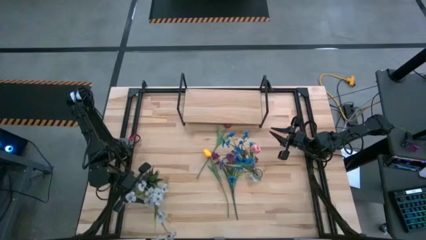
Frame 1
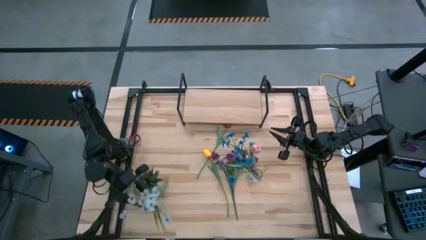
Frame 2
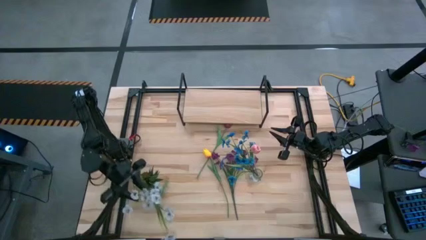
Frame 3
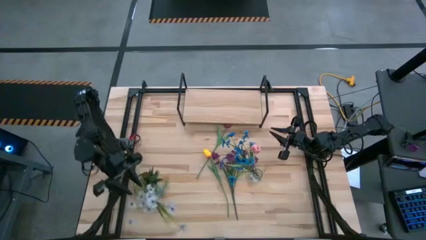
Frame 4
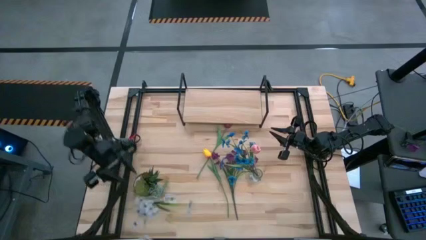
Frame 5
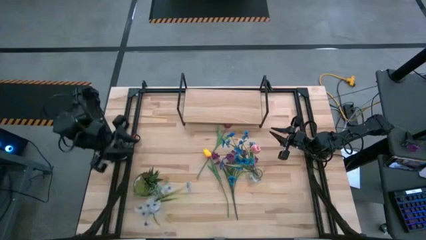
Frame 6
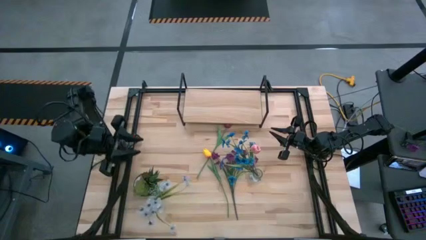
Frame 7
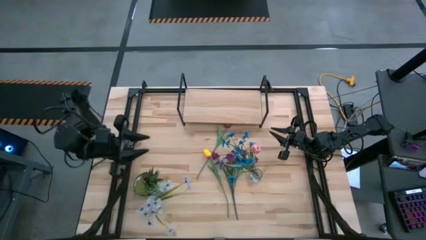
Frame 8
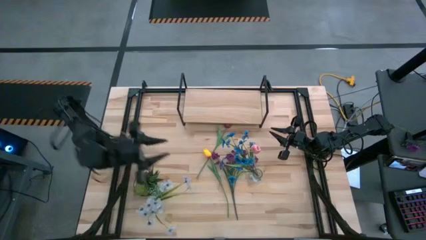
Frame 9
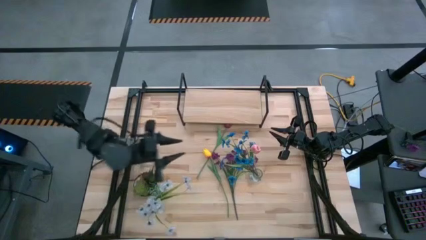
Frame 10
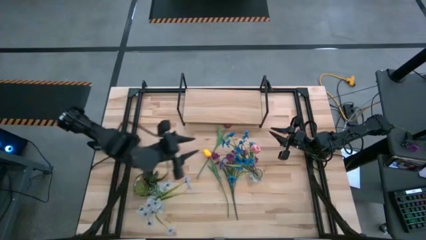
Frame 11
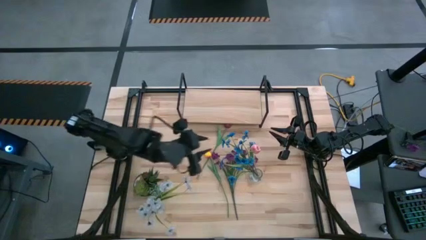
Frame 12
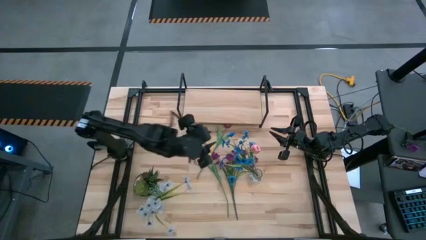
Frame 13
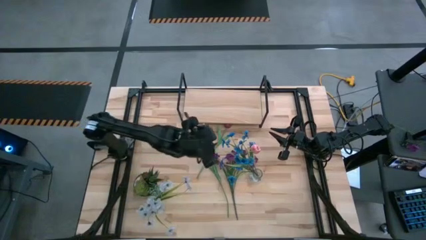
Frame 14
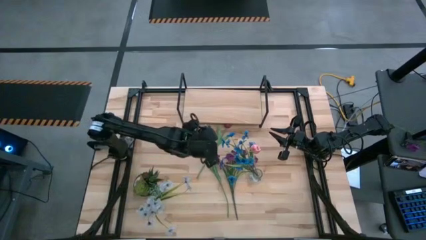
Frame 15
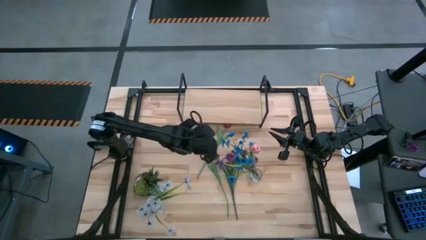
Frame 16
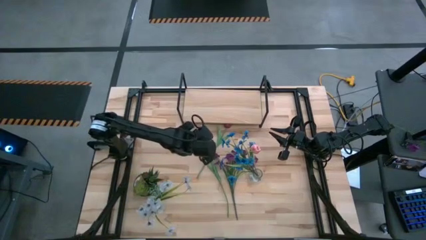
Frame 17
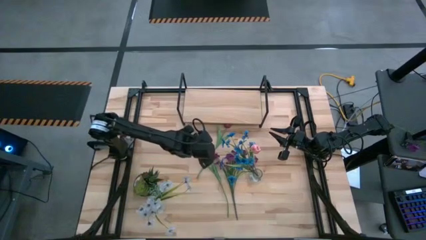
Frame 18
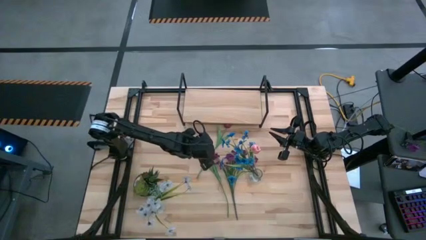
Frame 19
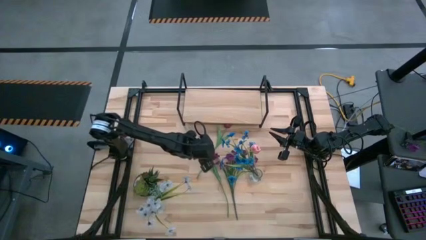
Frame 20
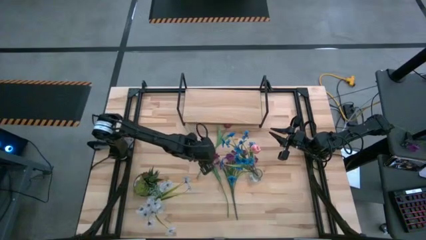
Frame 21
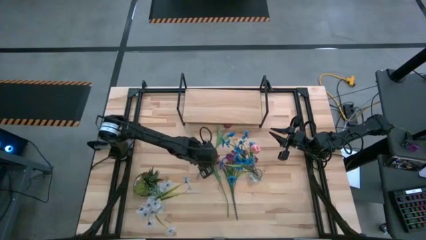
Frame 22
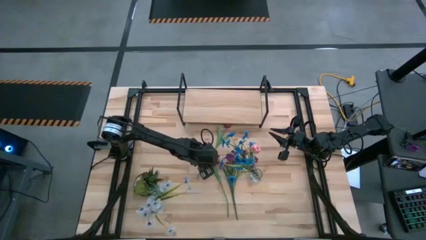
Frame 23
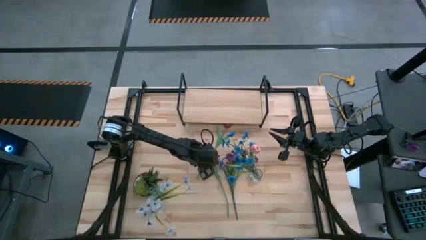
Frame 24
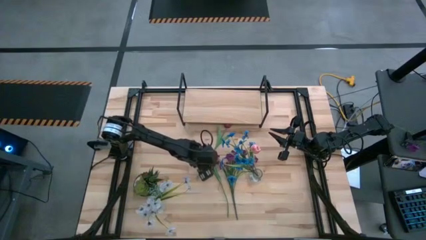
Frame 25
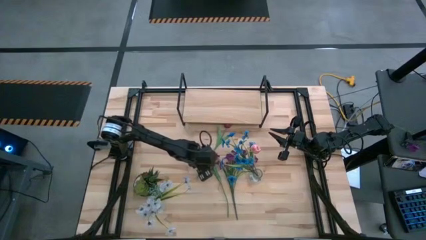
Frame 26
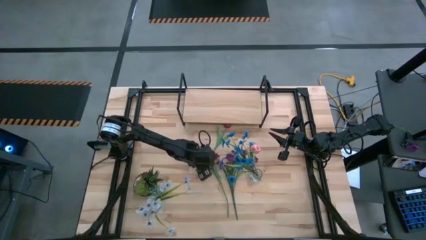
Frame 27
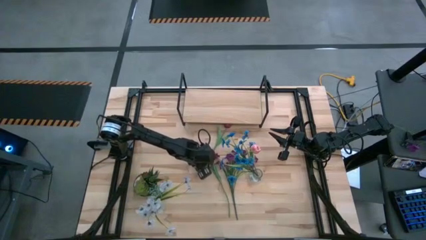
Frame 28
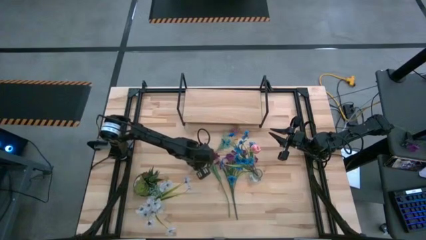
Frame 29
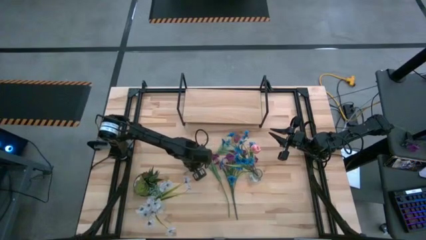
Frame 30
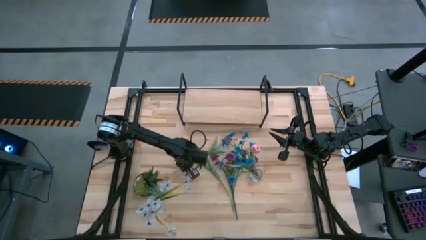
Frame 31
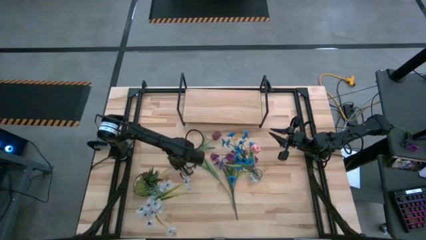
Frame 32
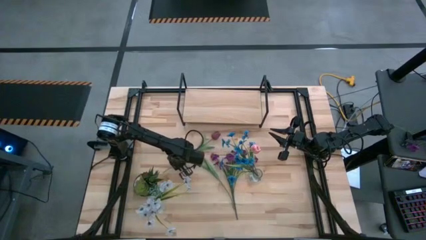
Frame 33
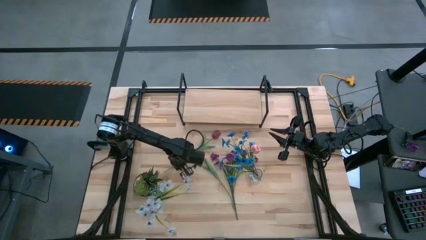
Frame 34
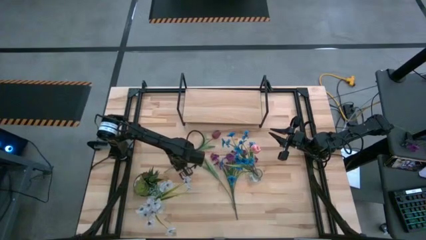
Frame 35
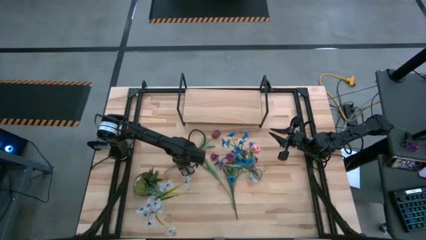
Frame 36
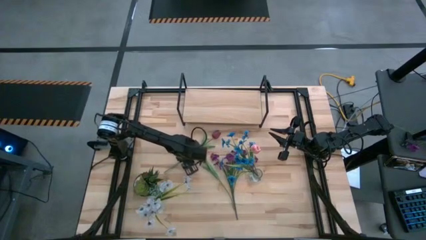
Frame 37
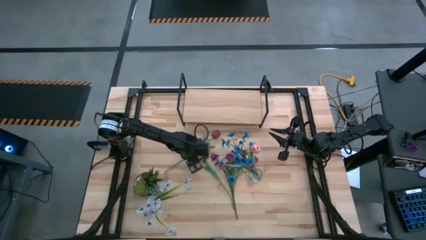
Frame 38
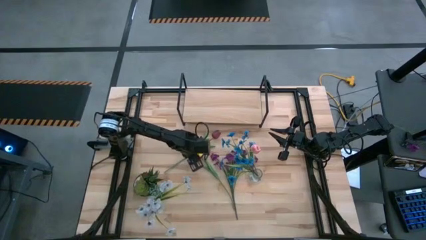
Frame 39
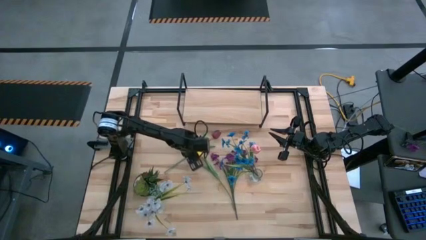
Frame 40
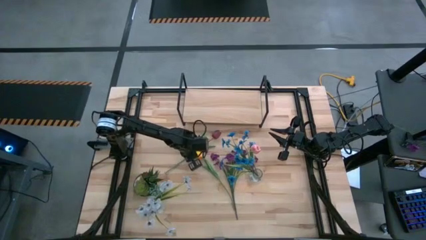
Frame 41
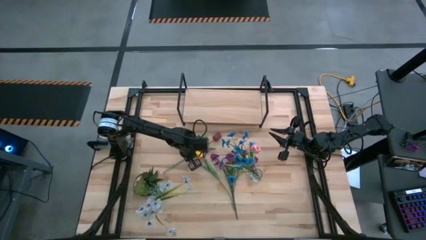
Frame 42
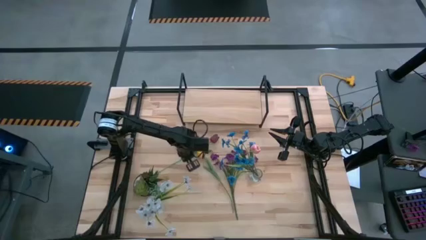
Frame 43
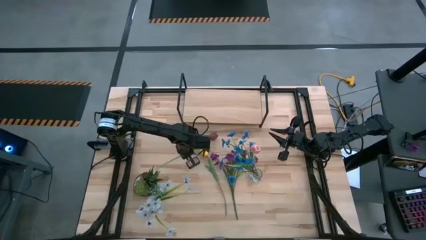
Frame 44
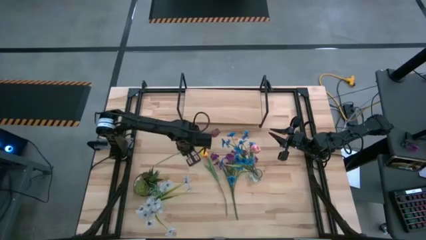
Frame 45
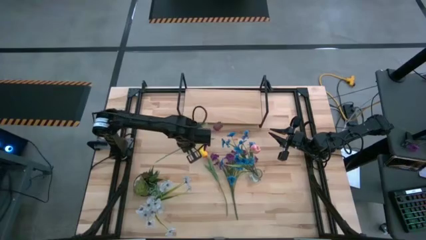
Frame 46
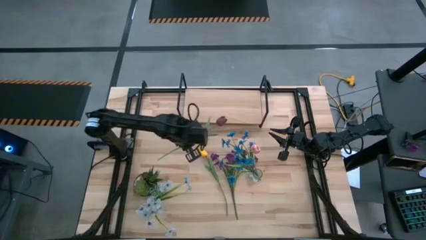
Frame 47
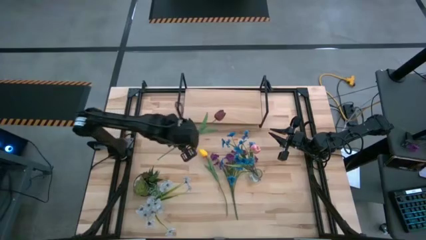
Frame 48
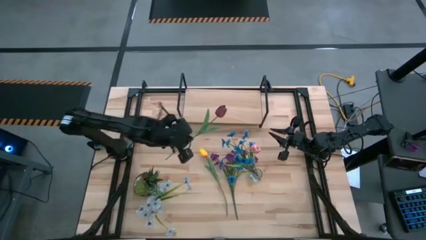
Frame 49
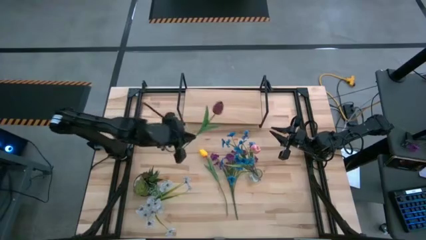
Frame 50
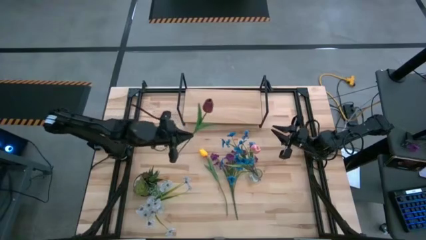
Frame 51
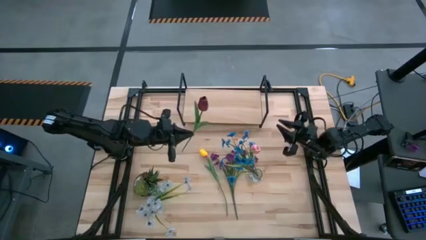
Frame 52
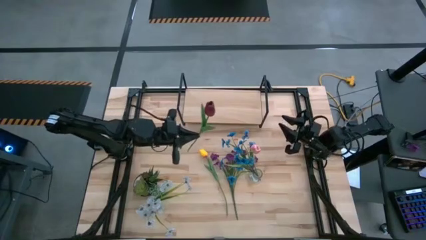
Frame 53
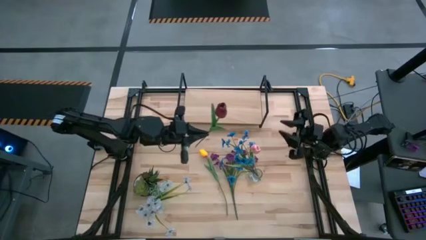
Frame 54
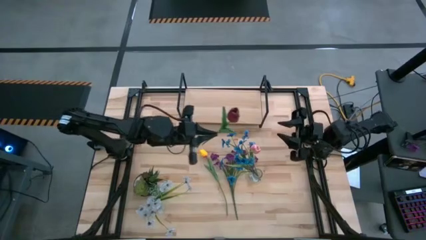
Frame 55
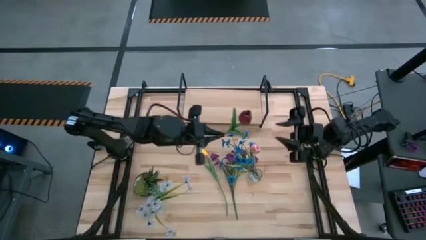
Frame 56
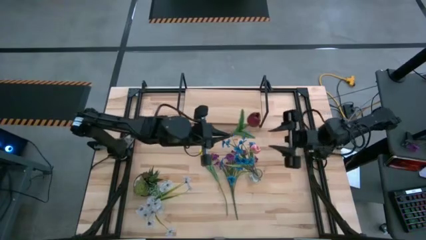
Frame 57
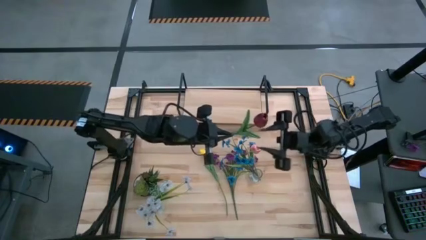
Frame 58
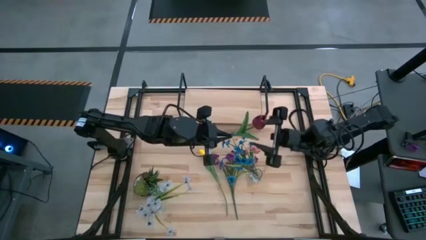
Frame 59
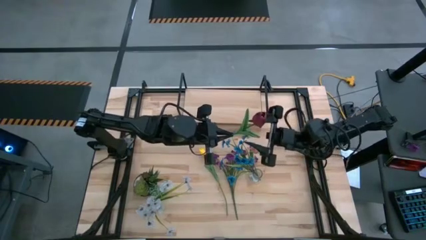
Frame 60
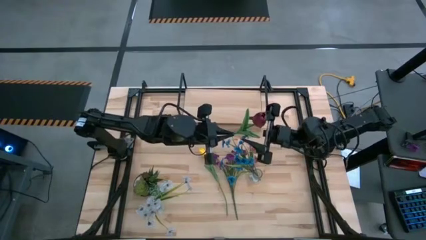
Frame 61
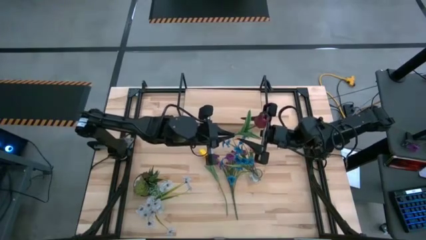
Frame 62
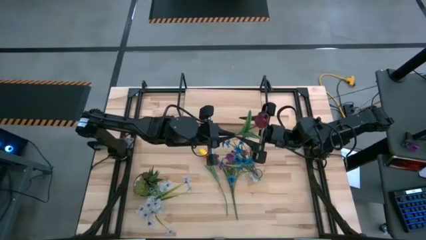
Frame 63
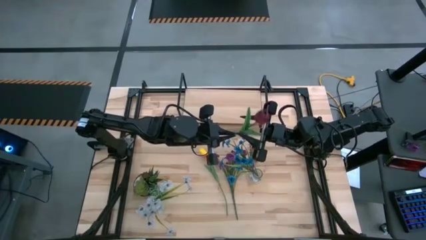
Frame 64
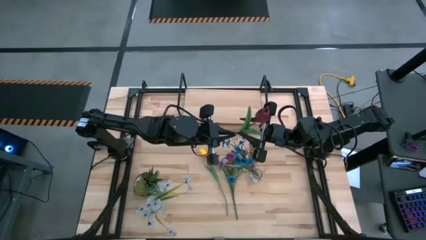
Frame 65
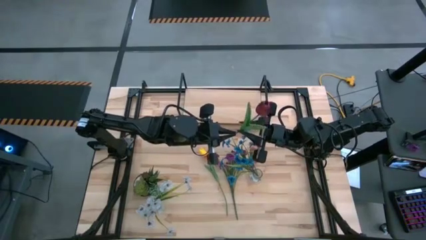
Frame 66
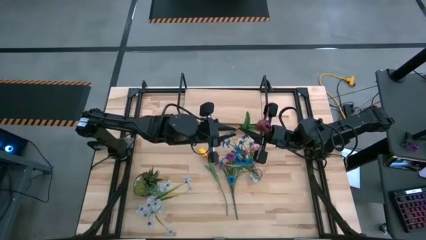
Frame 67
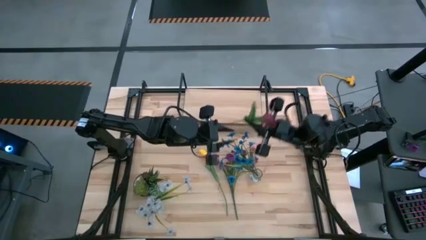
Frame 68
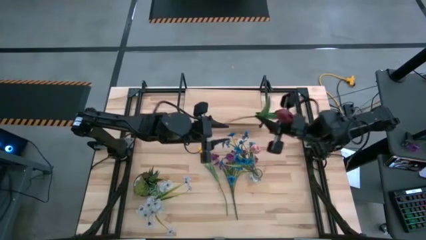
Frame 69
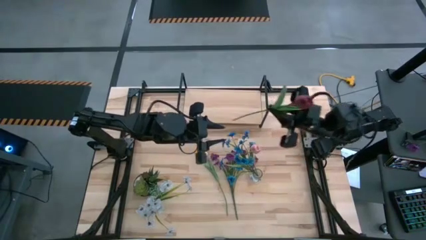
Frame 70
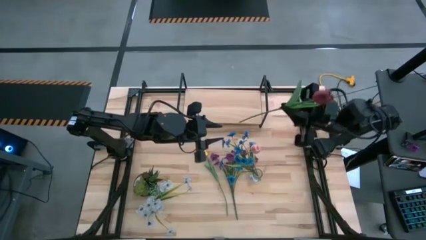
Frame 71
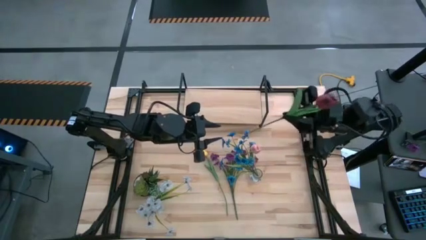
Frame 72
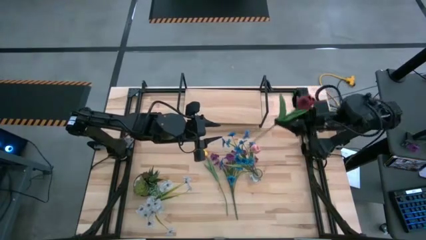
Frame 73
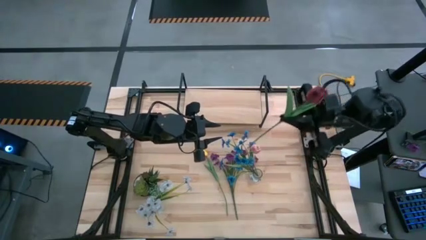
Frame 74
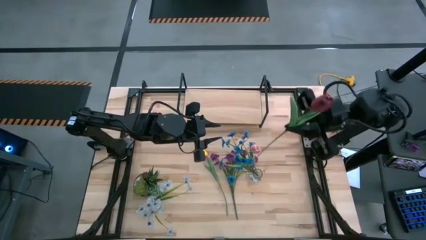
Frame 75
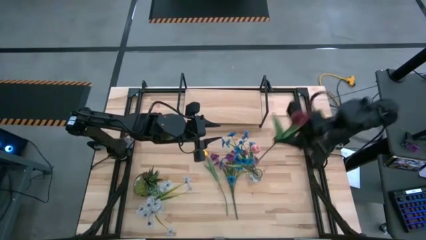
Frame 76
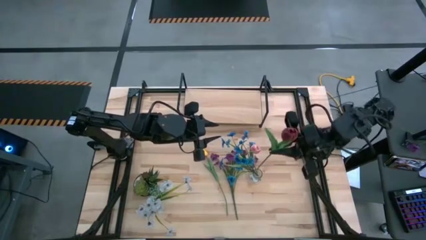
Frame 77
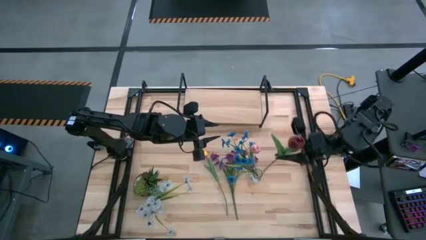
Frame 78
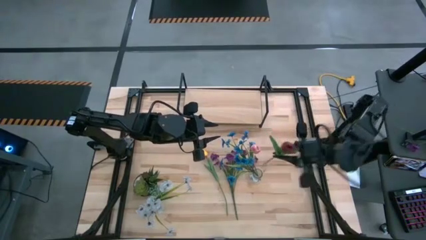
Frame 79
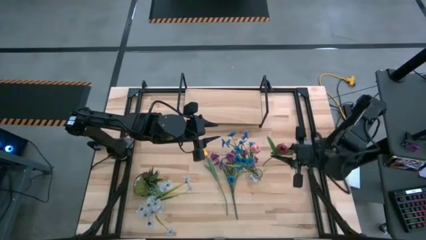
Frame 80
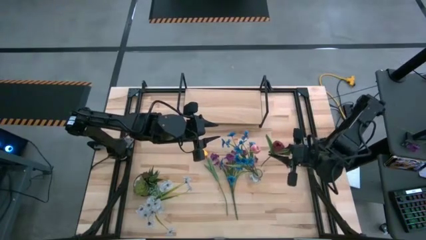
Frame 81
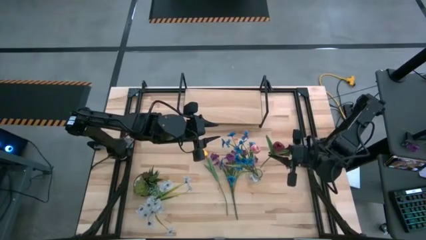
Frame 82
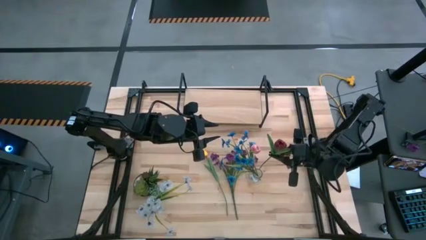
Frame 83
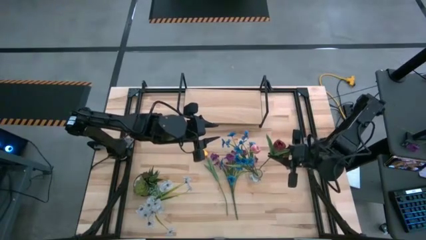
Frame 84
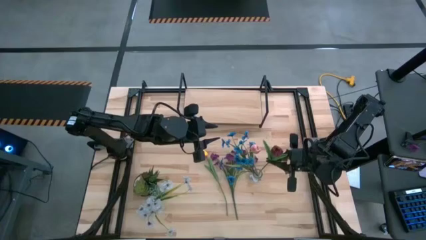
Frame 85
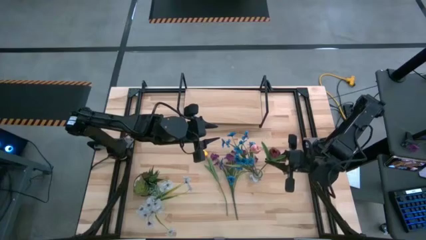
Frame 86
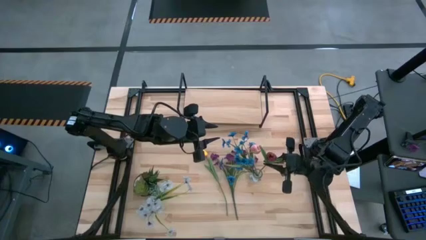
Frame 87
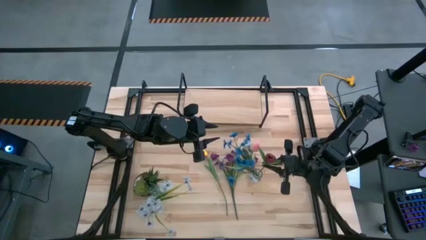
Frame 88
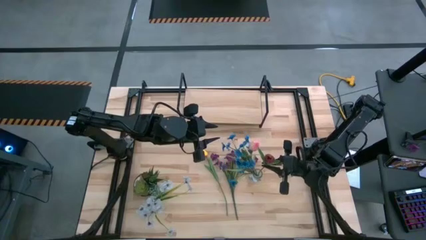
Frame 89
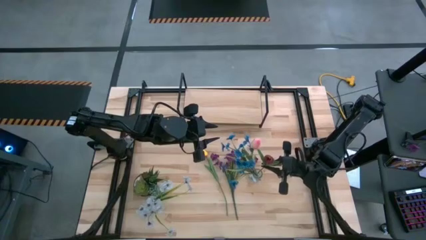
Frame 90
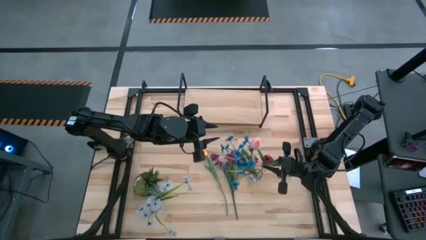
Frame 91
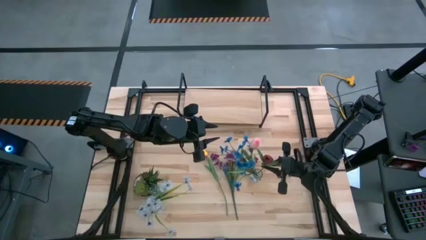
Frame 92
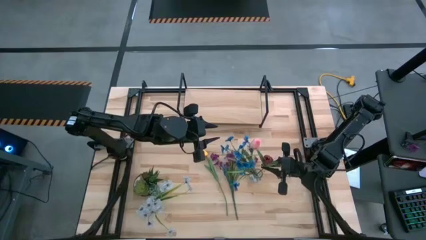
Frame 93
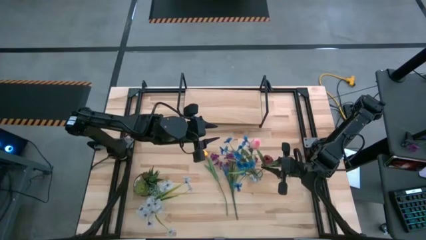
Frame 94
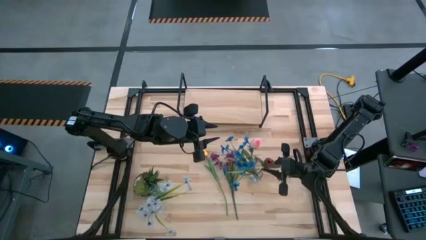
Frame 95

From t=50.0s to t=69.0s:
Task: Pick and place flowers into a vace then onto a shelf
Put the red flower into the right transparent vase
